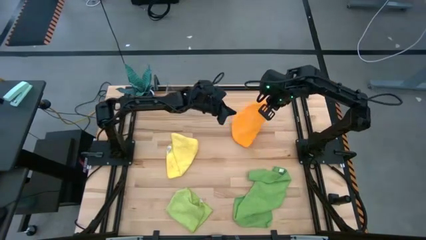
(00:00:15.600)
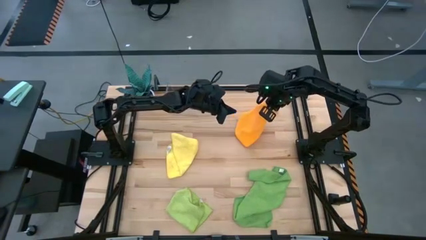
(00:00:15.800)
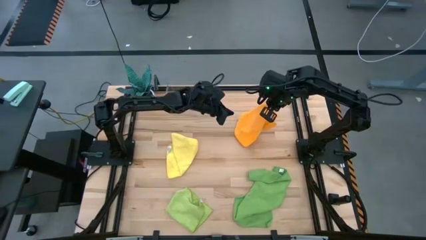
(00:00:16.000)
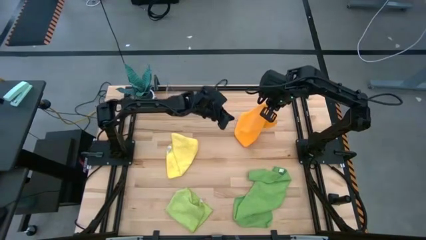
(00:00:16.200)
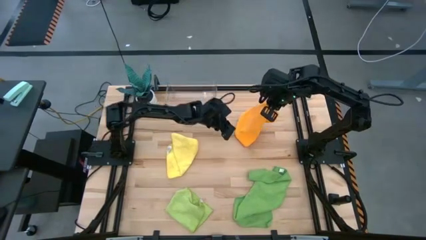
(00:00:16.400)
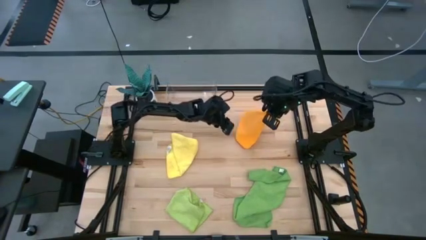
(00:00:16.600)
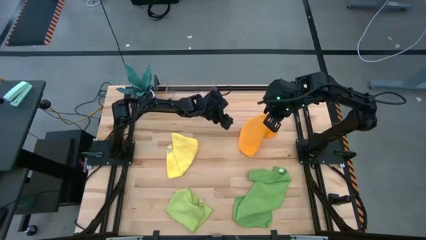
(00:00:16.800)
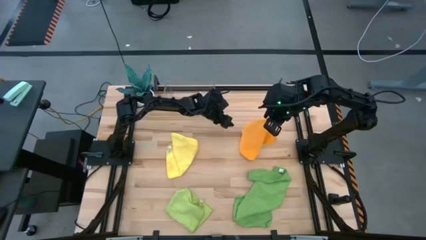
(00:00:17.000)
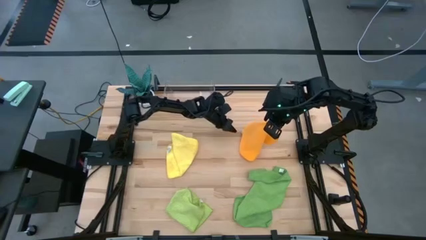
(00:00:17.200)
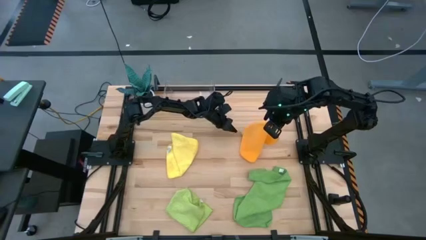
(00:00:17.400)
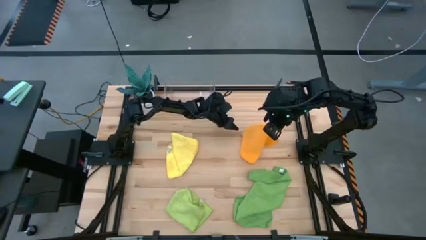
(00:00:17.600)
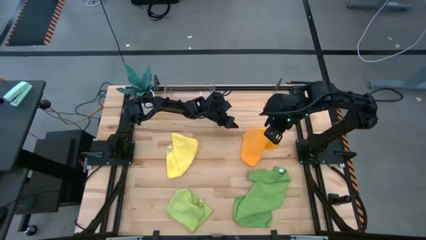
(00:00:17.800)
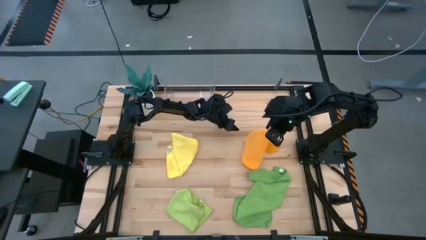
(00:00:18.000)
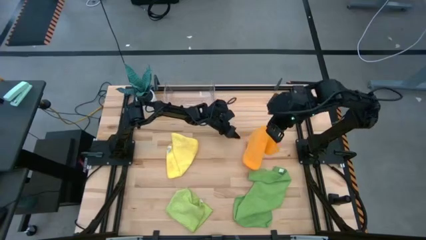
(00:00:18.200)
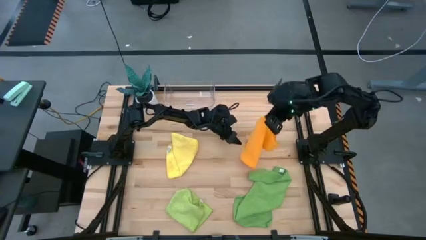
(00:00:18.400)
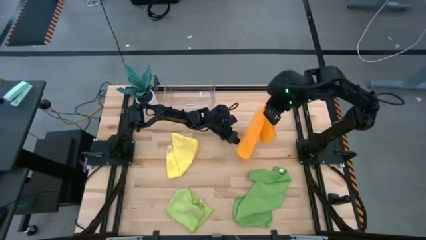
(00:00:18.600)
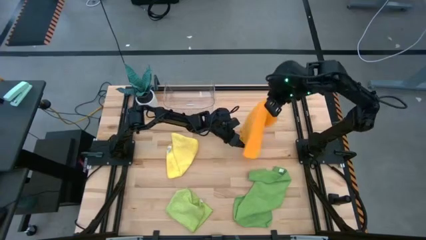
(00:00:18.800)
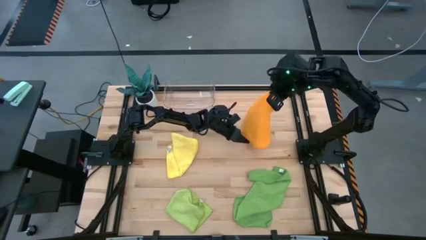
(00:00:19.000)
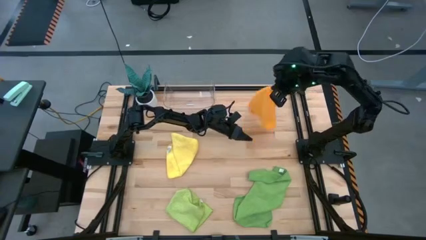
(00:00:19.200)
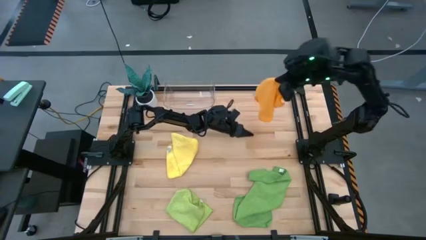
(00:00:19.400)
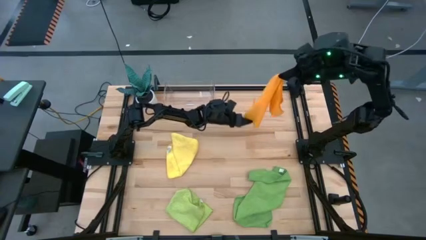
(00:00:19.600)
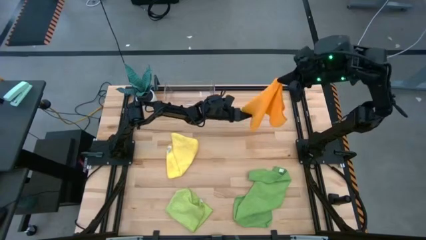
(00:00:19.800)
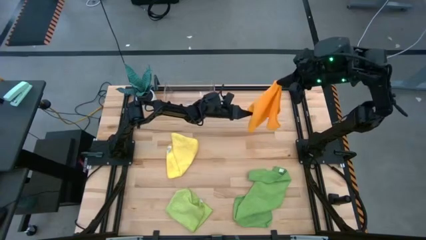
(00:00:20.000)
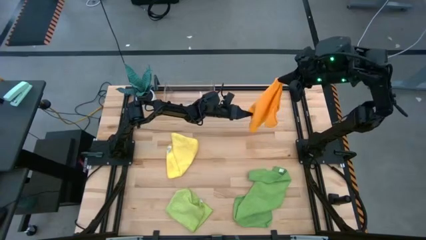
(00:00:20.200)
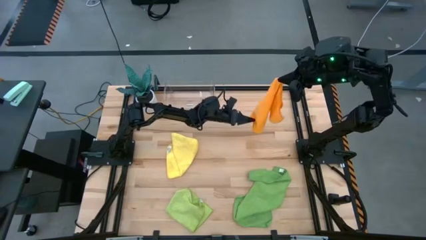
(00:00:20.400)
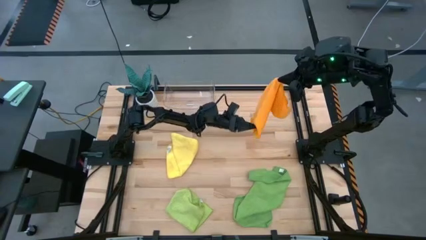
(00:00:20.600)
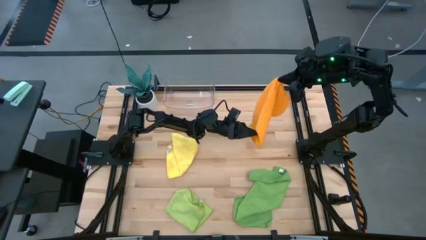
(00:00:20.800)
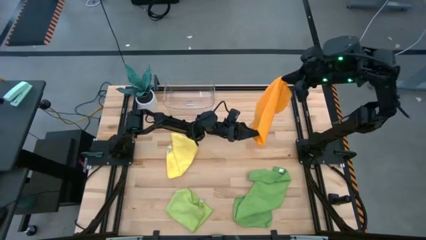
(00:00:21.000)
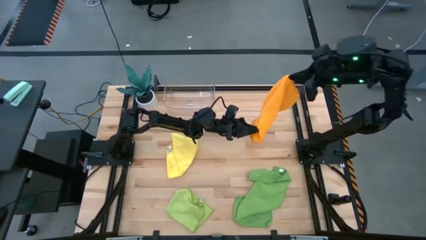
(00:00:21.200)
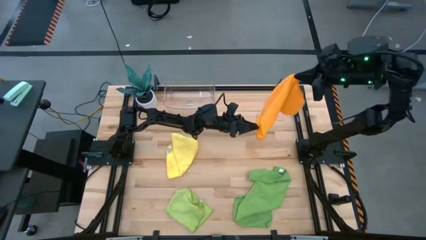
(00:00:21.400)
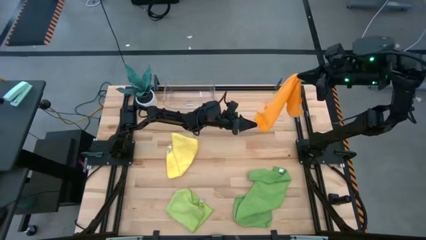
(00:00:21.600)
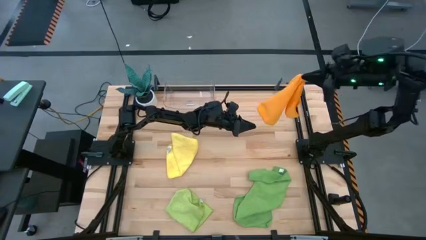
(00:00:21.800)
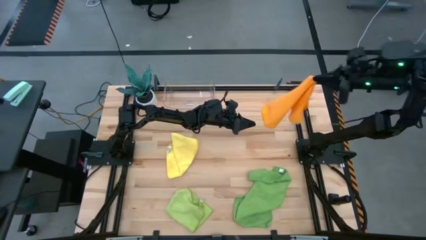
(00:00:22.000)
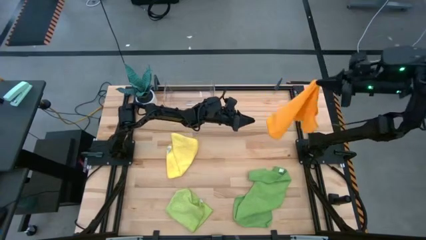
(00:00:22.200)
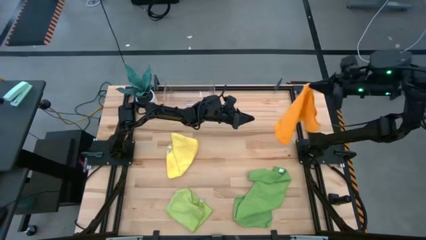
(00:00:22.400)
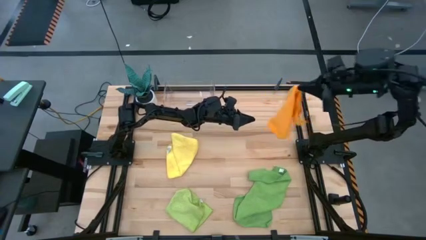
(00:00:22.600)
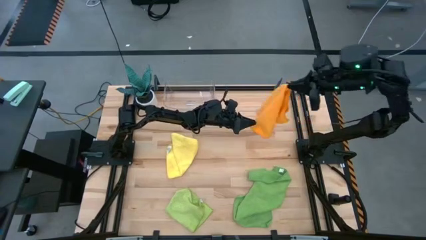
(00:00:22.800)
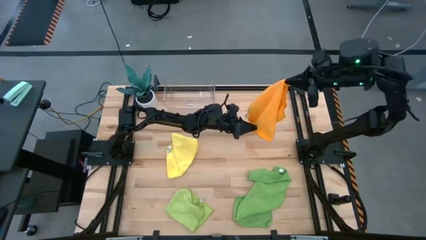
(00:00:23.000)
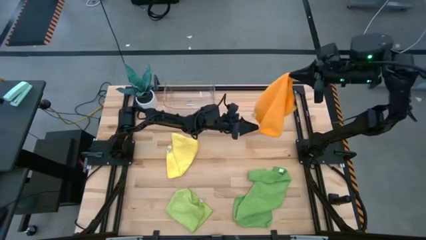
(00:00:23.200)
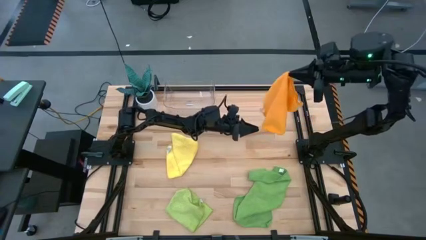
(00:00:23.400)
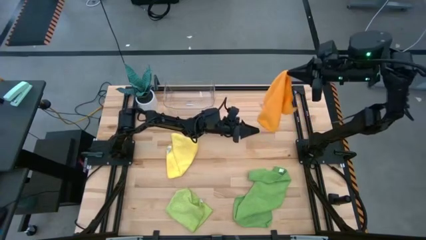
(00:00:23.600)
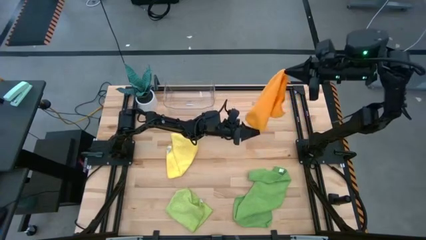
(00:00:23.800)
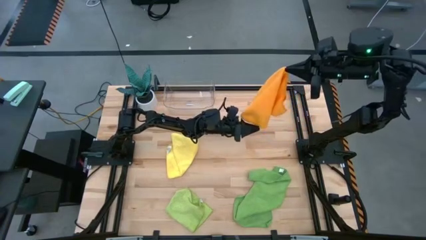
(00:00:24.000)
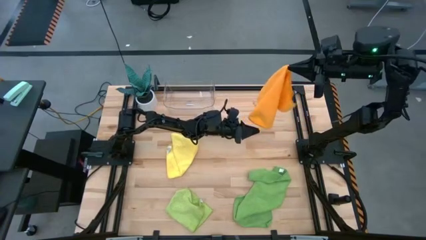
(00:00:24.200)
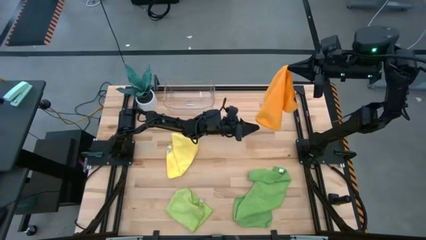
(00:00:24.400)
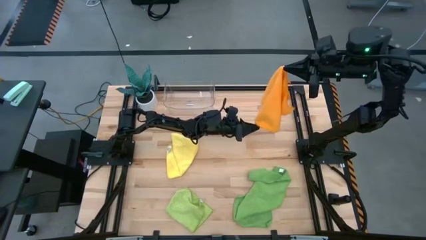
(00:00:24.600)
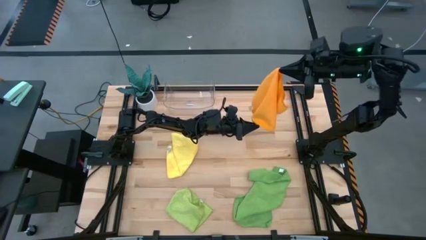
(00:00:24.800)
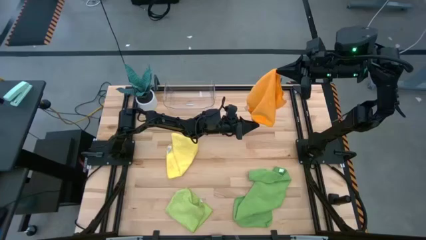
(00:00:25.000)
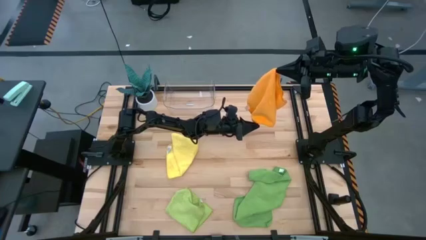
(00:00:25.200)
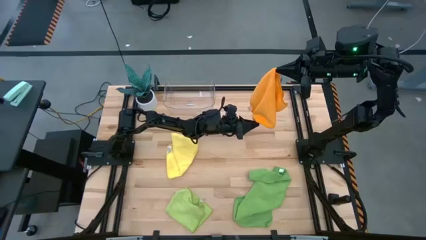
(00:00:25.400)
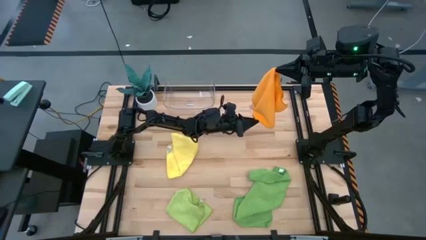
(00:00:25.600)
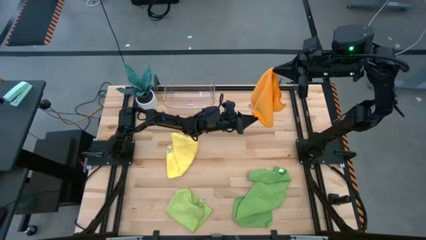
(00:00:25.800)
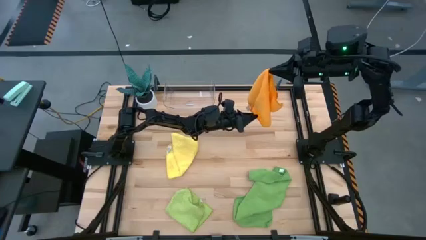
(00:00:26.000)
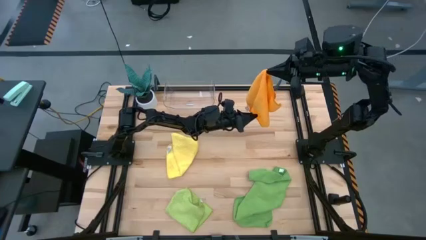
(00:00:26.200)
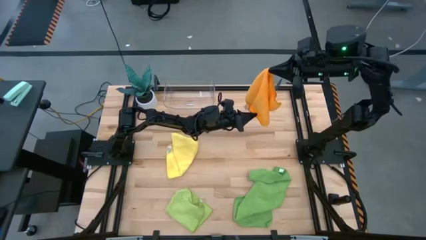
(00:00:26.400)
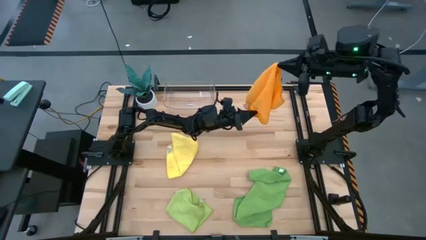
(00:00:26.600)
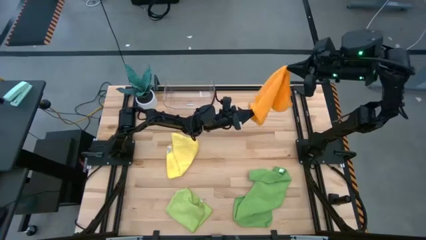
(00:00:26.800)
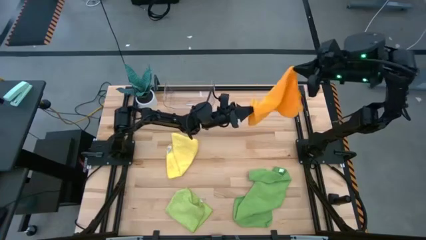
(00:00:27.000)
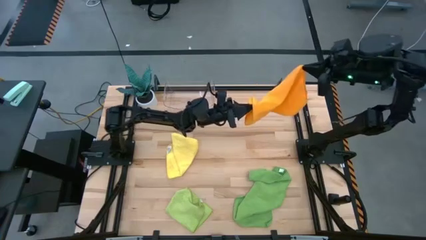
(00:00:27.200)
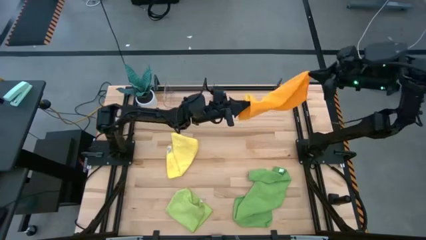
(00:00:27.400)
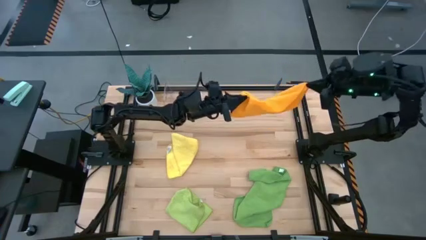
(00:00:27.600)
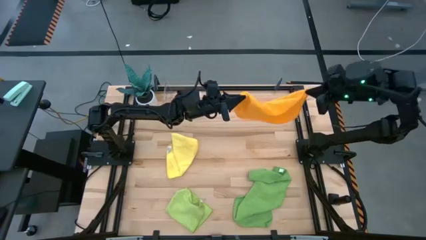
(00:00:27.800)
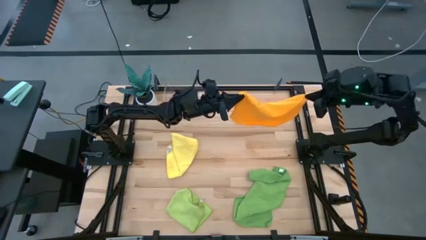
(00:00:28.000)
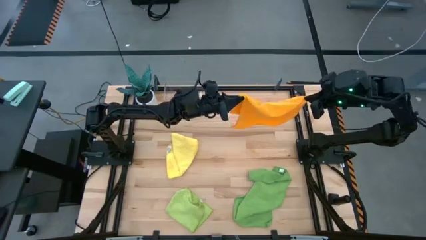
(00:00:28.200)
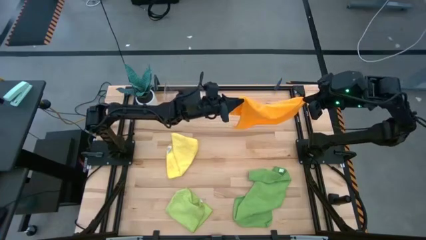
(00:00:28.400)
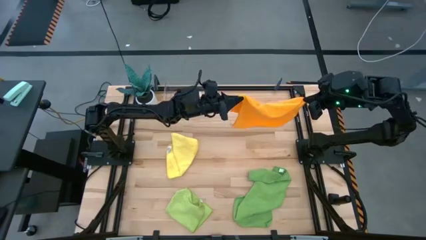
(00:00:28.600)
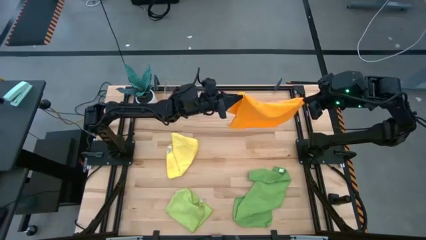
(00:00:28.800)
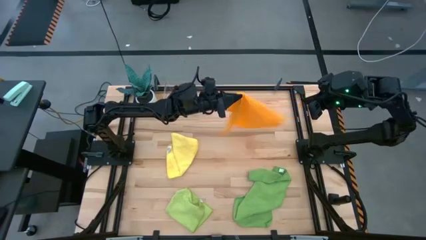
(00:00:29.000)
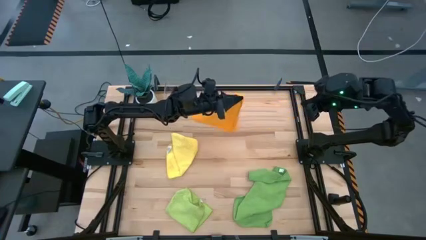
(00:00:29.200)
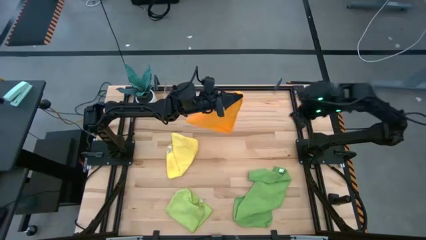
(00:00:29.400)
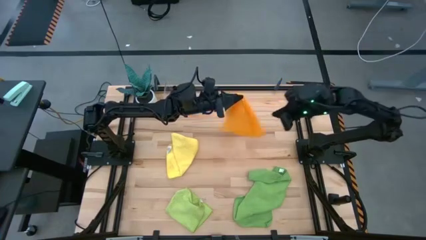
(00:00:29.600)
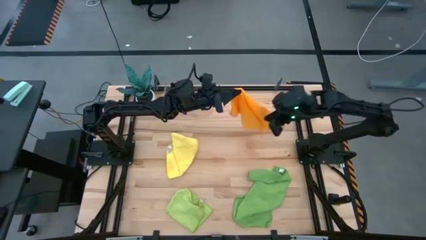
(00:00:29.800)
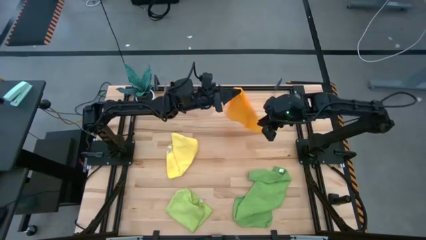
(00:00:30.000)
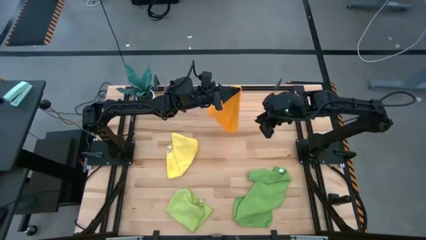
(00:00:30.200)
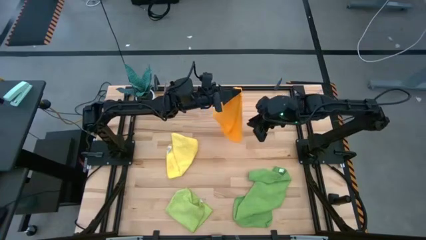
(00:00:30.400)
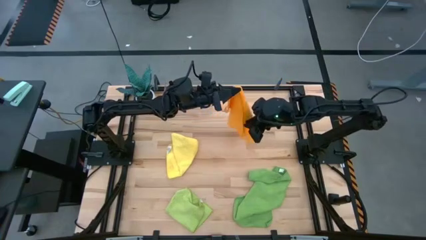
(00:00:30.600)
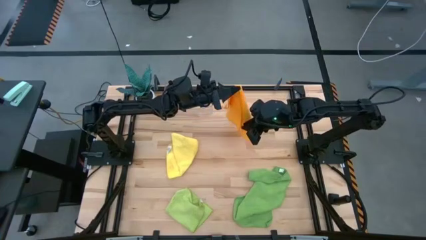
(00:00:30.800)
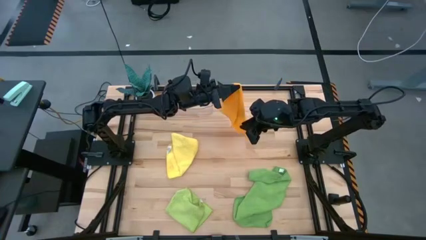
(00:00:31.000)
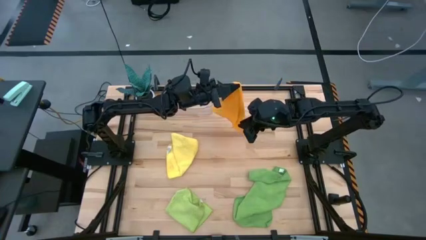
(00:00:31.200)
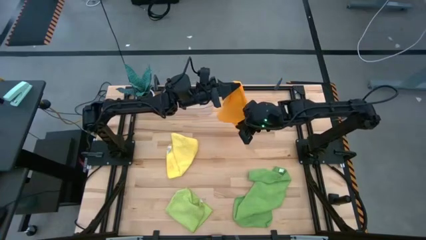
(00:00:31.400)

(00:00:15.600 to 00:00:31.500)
Task: Fold microfiber towels
Fold the orange towel
